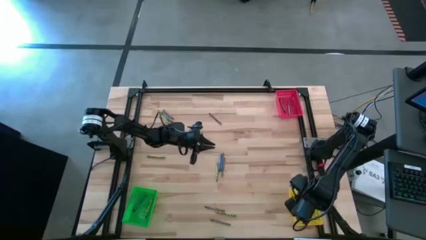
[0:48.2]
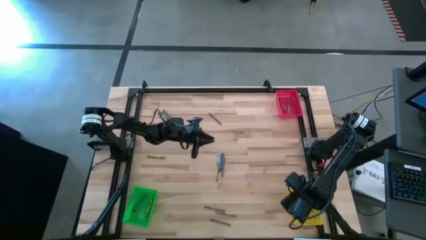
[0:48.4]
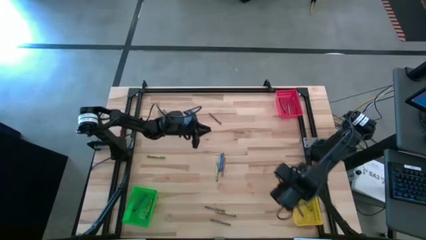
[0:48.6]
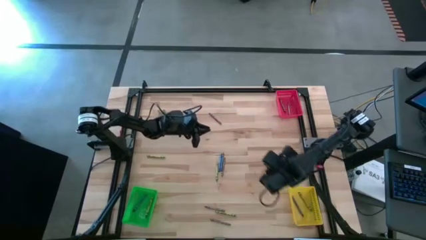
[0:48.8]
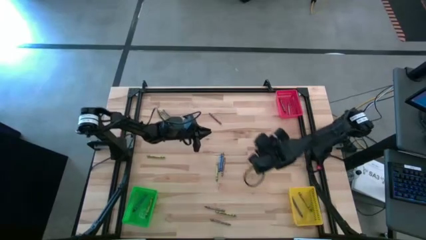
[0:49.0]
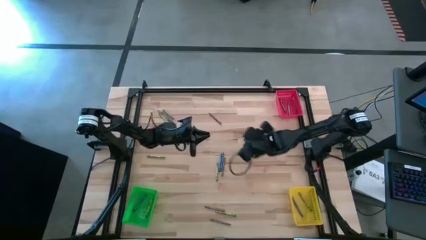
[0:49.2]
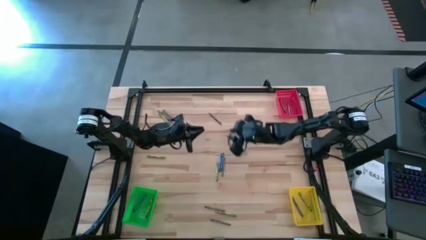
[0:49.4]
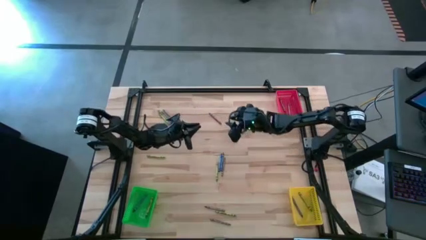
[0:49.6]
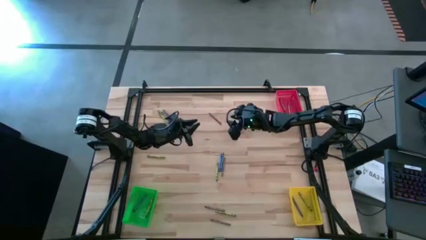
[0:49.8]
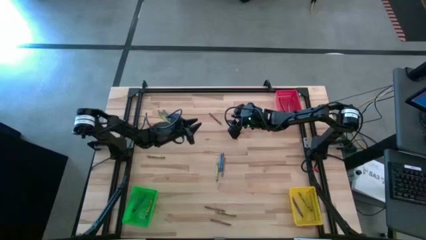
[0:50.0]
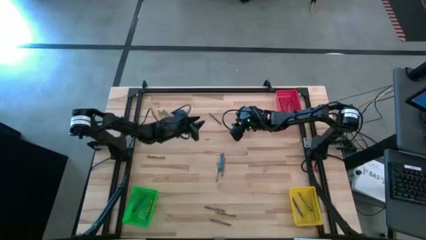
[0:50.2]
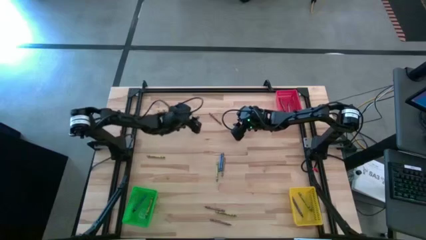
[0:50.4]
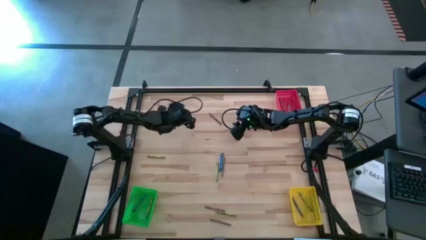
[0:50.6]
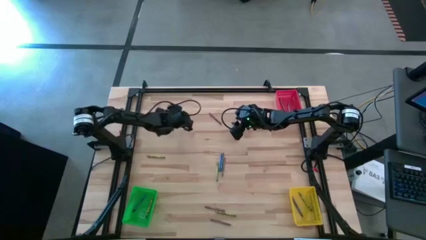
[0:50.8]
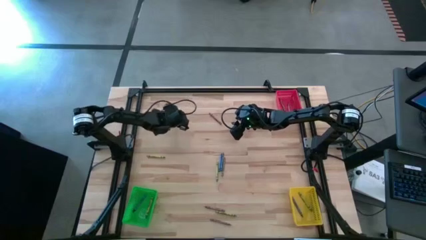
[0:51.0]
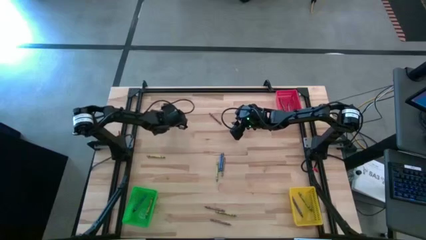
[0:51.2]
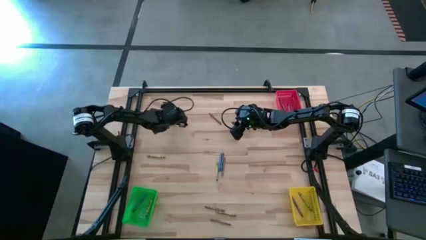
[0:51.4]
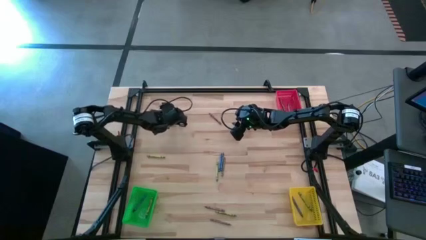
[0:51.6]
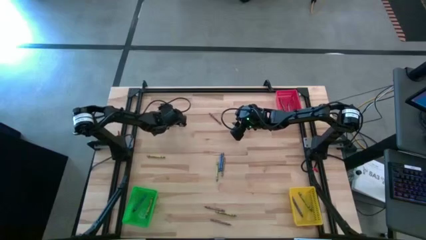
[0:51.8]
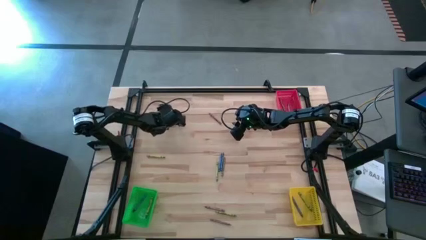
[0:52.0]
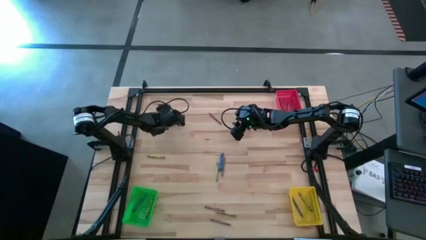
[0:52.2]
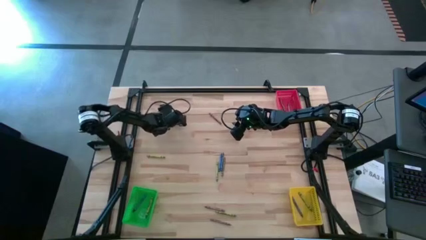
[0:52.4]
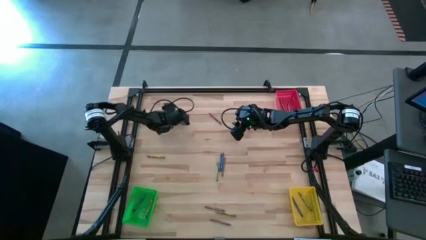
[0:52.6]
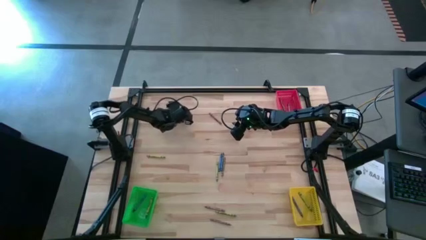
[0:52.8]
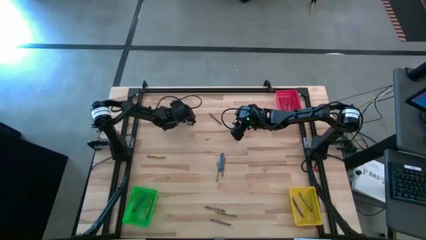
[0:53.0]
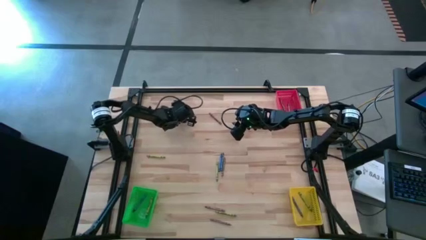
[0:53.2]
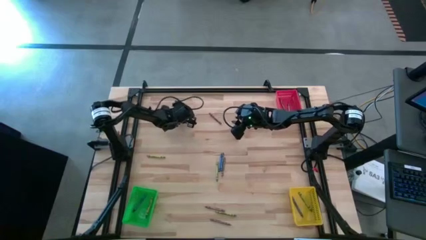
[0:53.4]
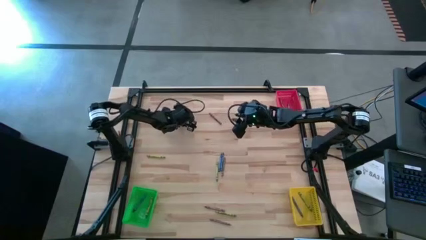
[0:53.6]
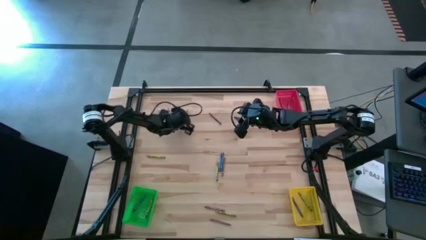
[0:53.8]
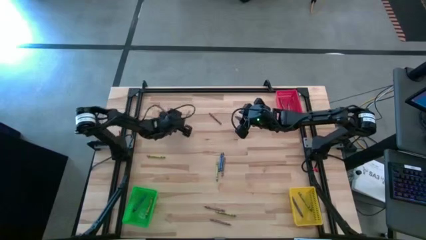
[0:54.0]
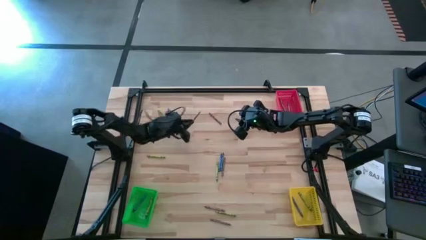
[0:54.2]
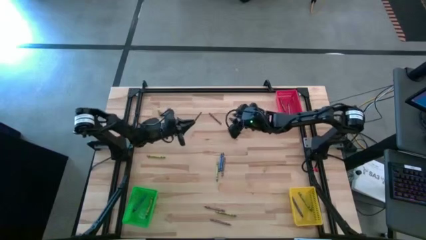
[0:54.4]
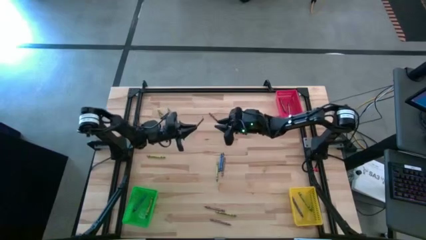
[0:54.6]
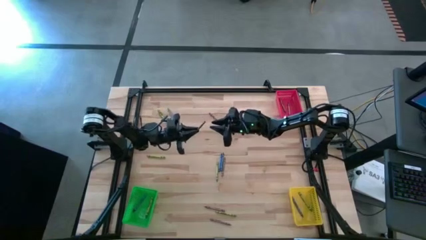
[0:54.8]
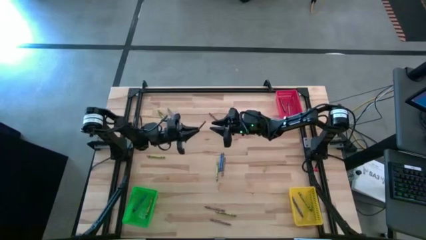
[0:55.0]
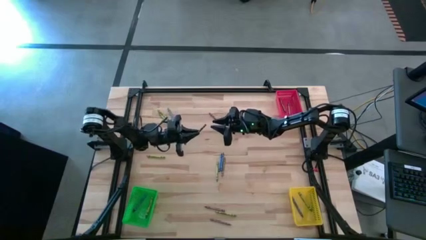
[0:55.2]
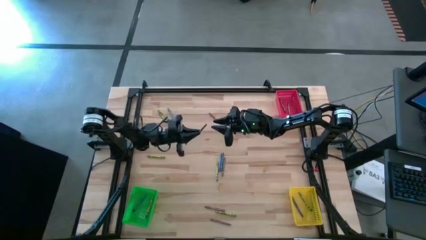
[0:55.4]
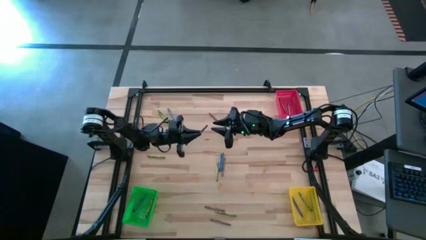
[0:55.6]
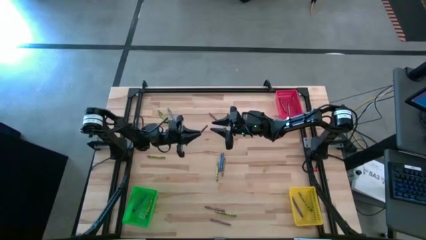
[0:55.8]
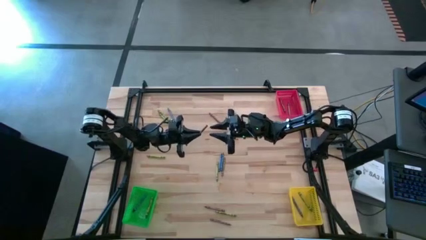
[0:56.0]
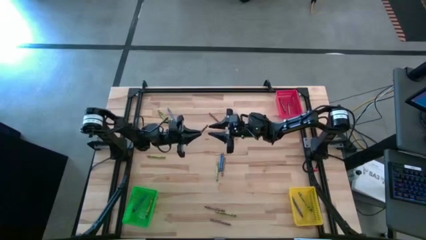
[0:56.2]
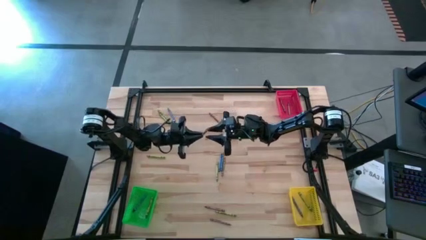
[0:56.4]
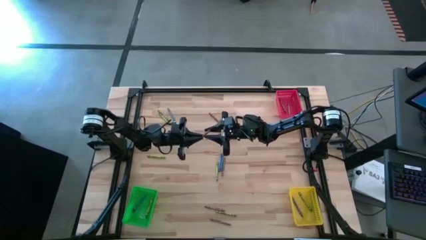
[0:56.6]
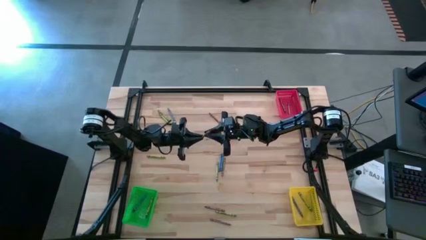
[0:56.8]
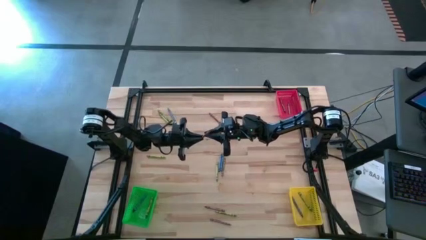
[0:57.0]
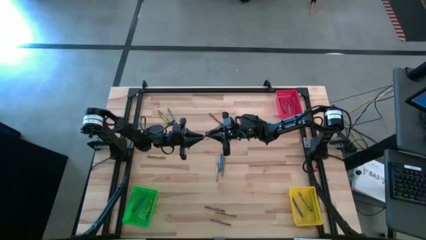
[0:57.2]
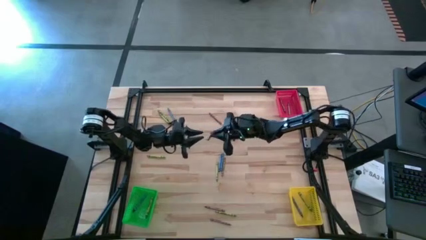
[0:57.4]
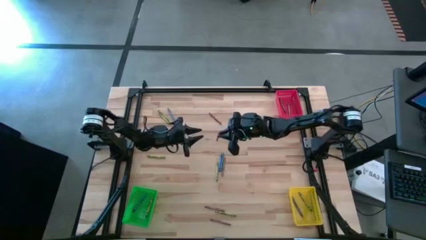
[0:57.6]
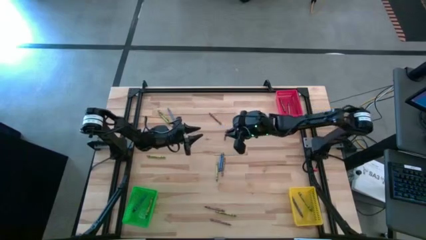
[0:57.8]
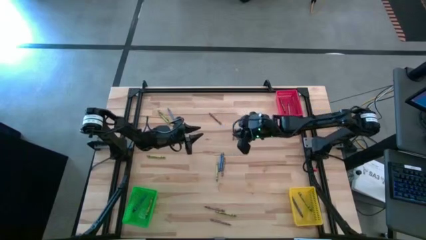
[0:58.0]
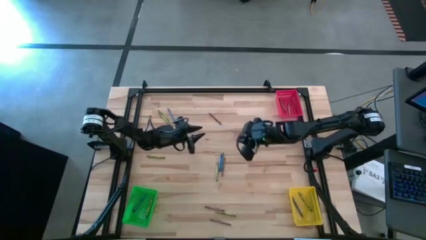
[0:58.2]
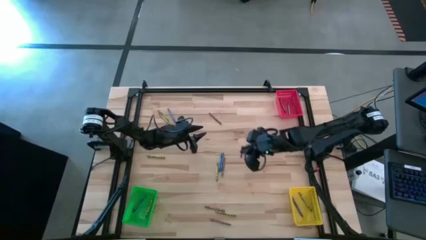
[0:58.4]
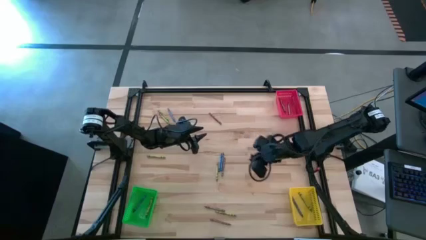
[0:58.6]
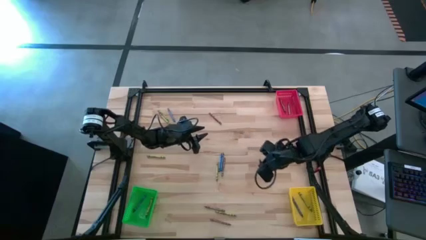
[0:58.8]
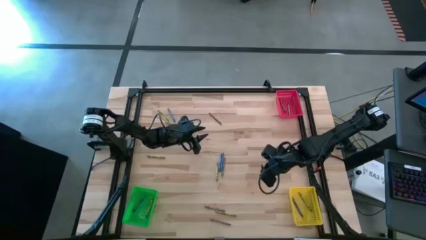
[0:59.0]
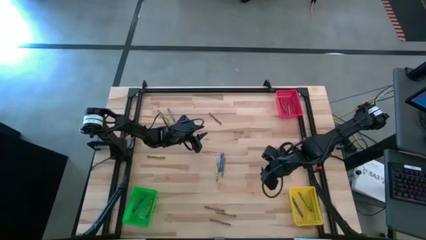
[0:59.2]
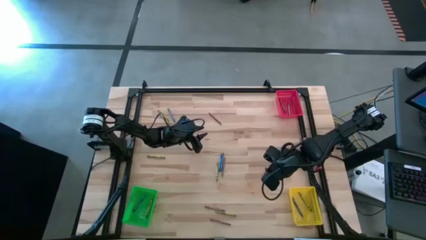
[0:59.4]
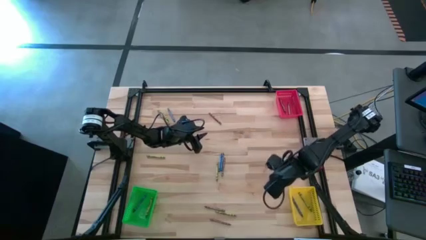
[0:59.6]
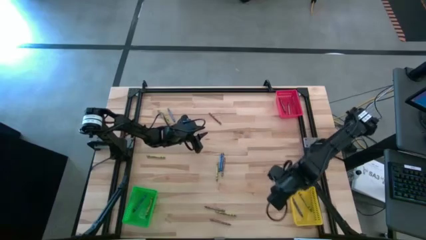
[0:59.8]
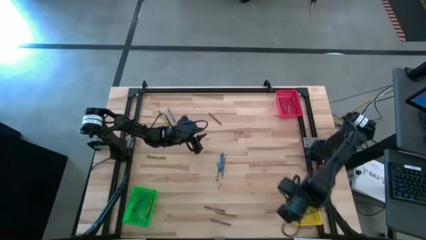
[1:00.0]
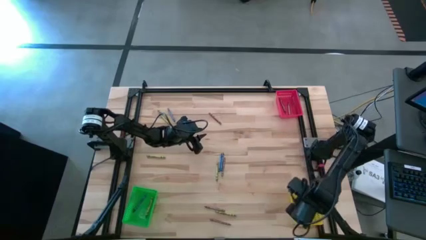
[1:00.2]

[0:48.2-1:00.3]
Task: Sort crayons
Put the brown crayon into the yellow bin

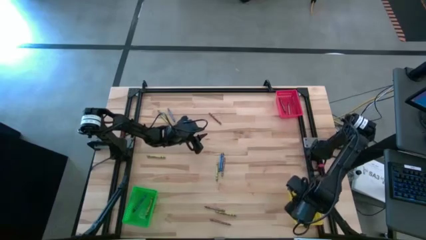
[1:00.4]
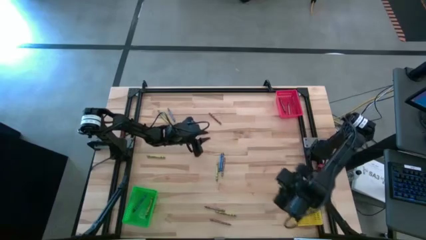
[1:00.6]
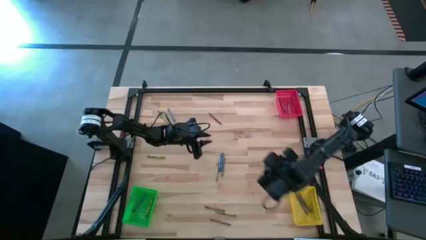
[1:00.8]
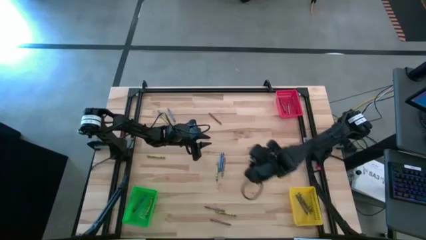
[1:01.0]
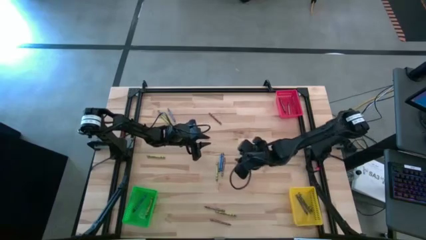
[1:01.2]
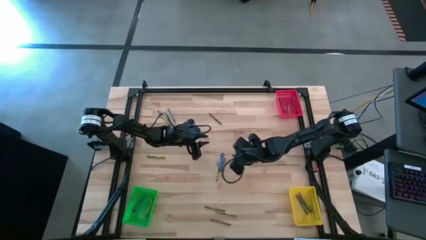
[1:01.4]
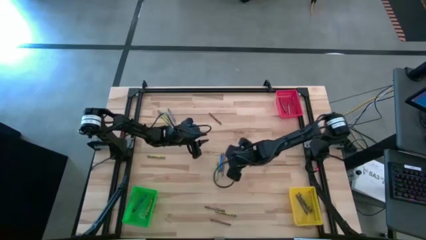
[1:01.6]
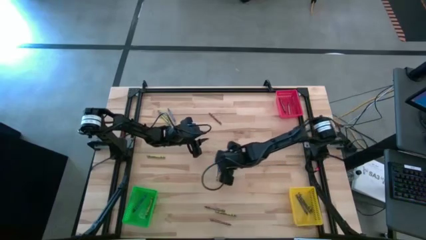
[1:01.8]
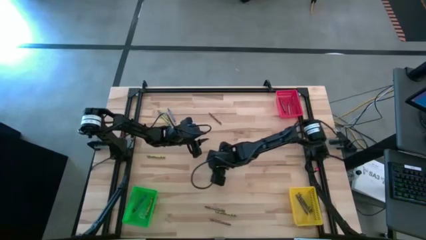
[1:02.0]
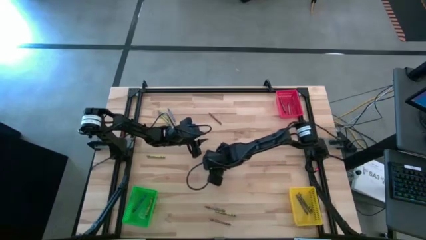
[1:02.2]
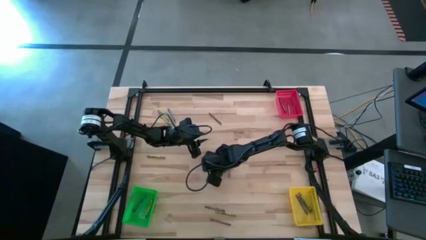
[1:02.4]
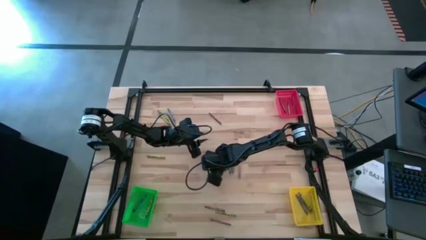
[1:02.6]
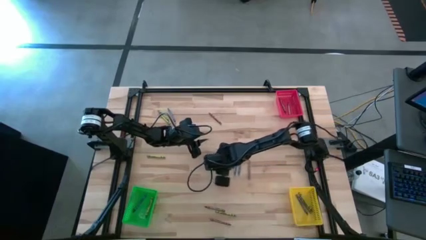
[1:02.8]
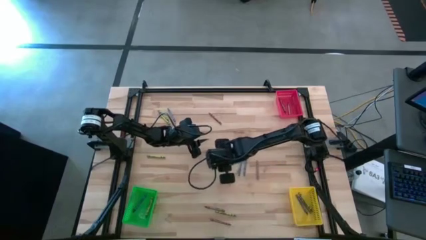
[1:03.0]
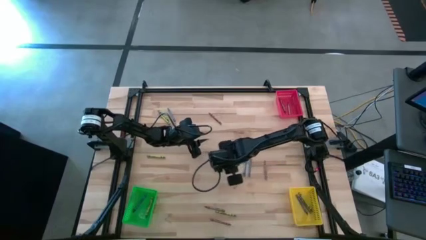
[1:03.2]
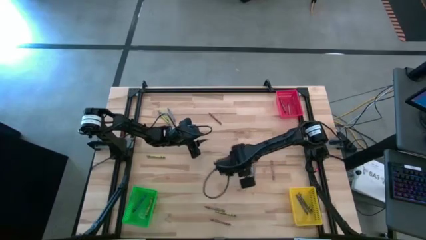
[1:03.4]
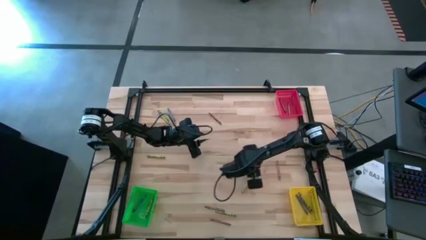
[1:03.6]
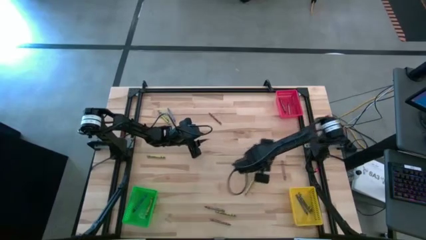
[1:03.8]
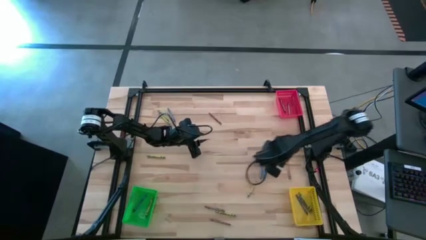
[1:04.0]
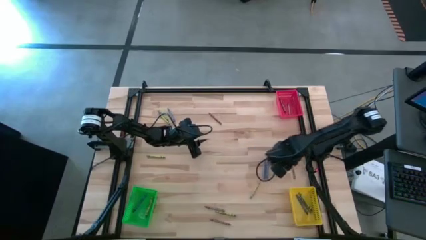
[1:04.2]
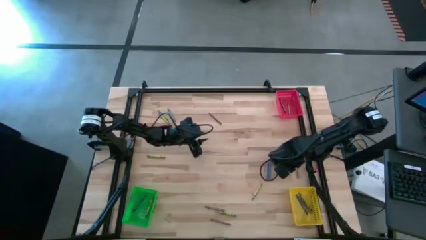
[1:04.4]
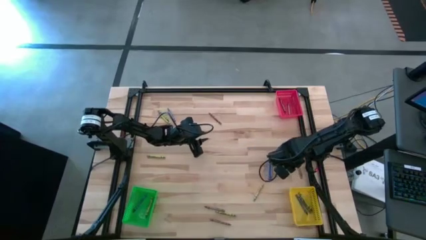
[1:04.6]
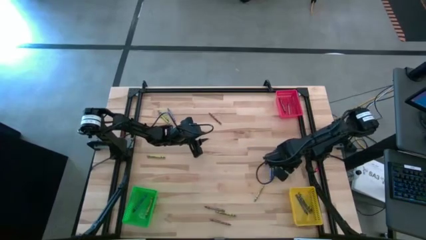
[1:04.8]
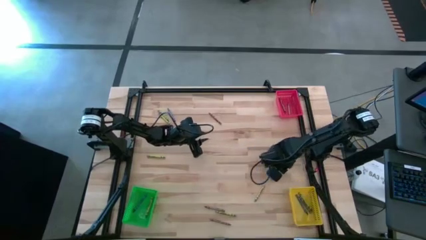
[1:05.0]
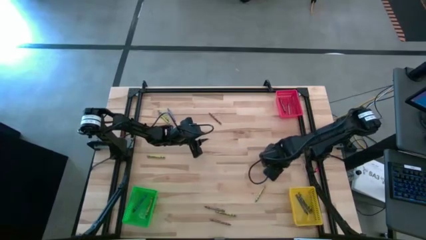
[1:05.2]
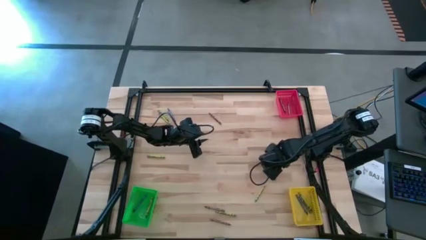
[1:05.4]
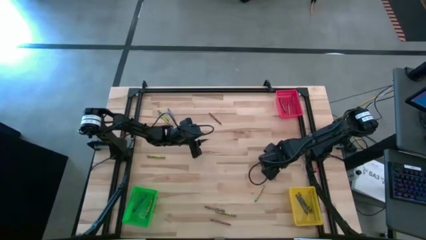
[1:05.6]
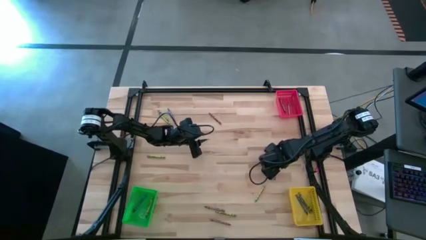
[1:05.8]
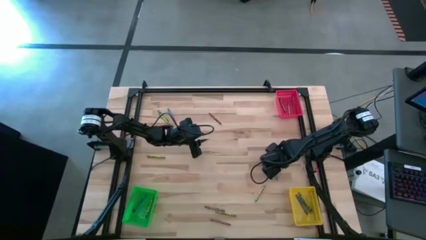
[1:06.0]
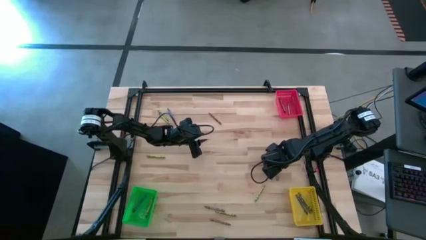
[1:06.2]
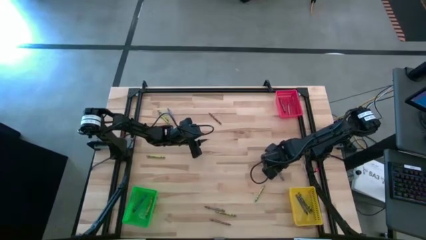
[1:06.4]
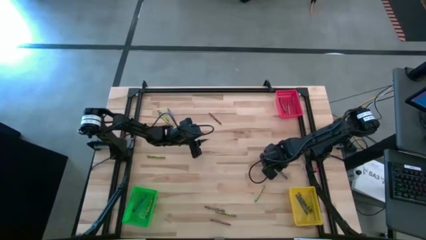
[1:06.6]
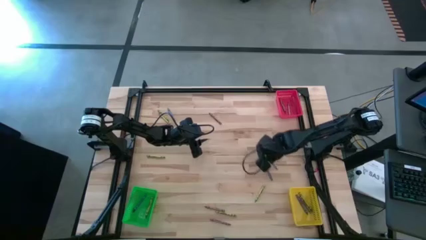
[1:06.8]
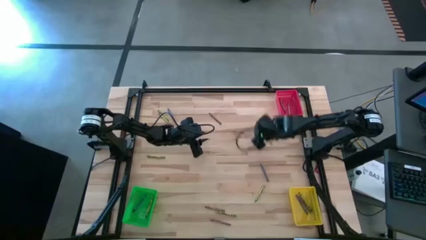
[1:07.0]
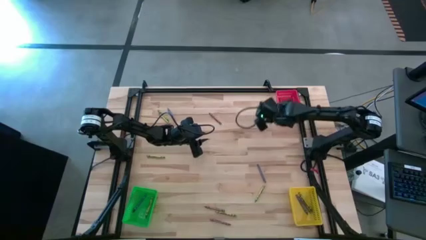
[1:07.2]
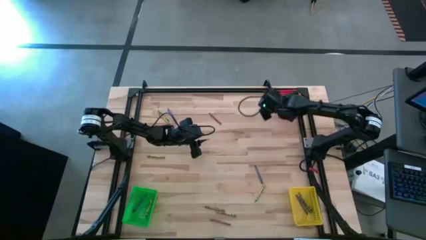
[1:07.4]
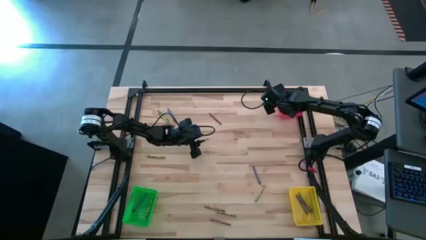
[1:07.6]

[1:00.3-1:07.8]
Put the blue crayon into the red bin
